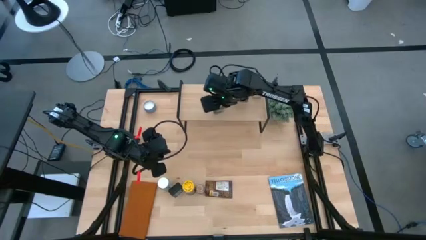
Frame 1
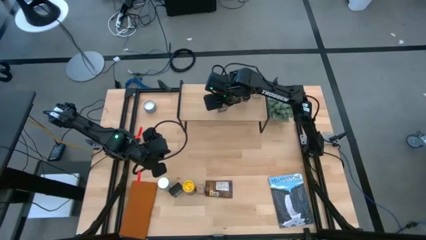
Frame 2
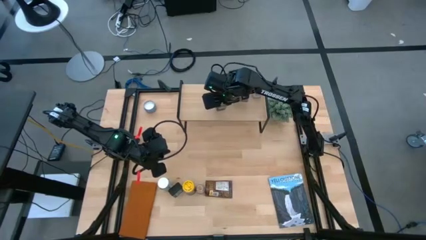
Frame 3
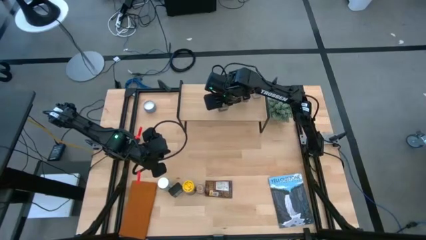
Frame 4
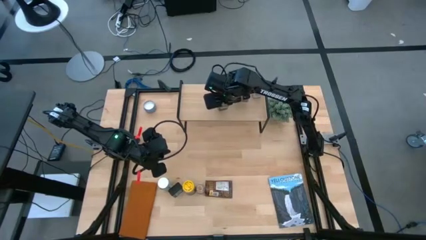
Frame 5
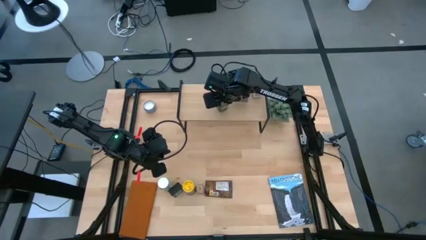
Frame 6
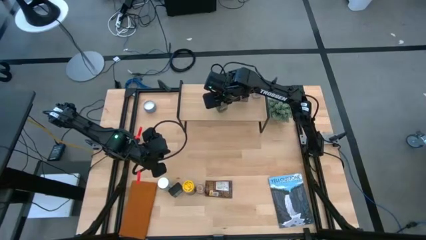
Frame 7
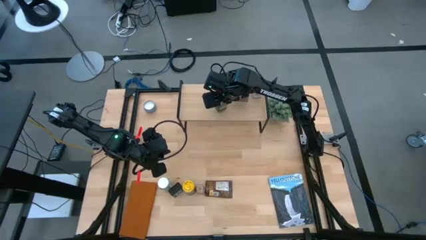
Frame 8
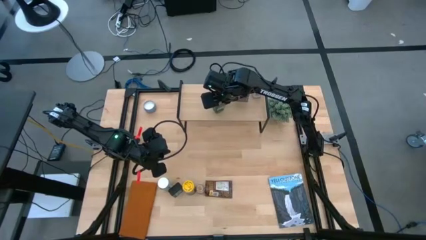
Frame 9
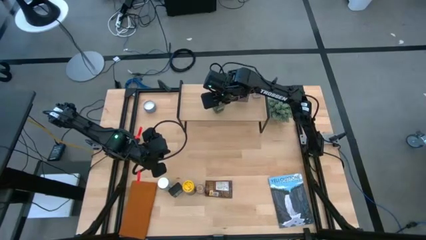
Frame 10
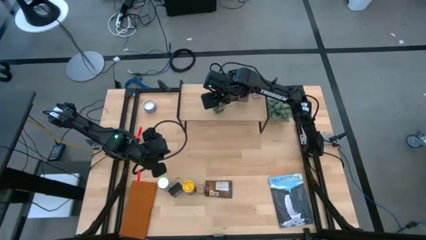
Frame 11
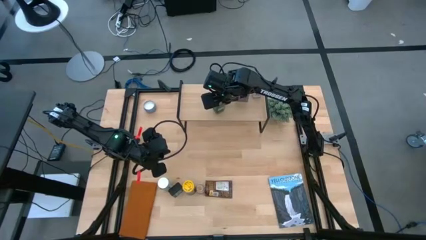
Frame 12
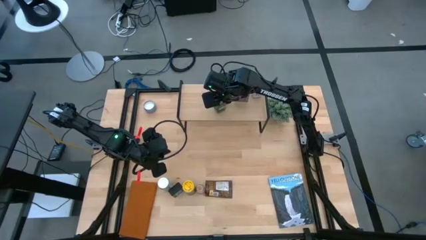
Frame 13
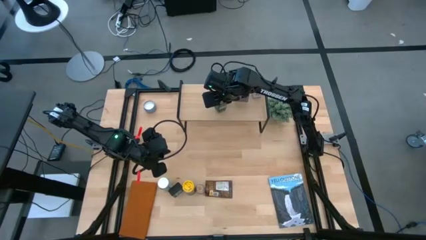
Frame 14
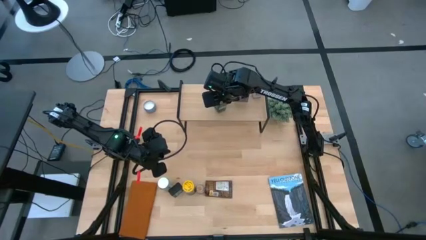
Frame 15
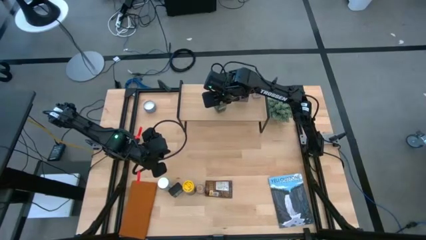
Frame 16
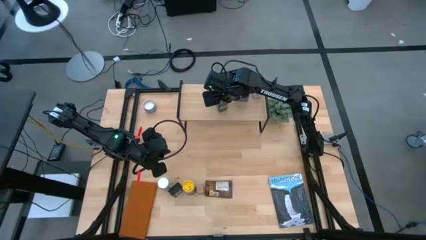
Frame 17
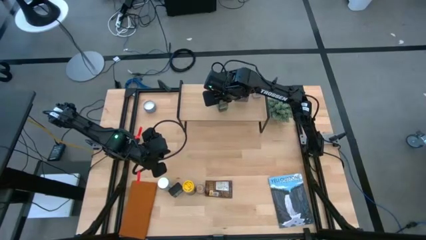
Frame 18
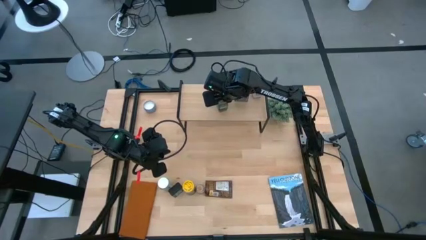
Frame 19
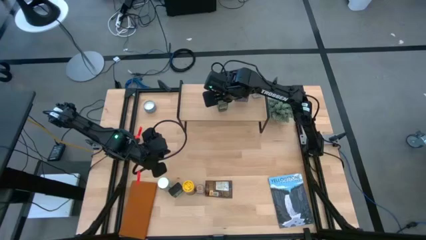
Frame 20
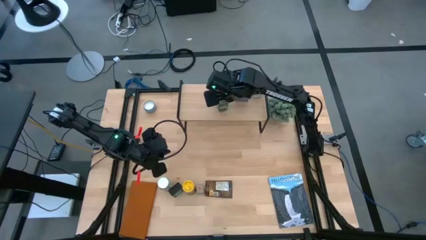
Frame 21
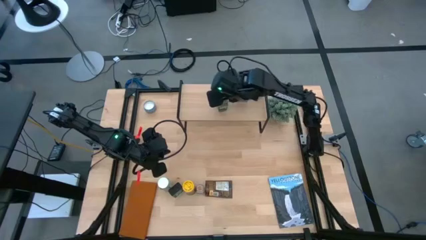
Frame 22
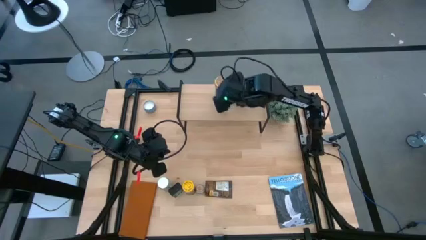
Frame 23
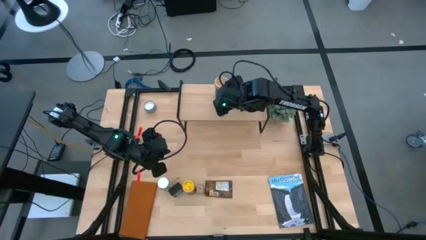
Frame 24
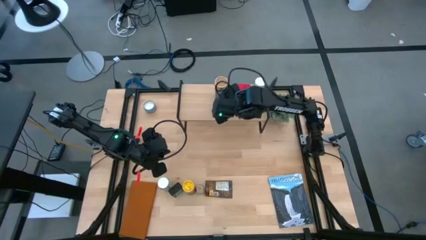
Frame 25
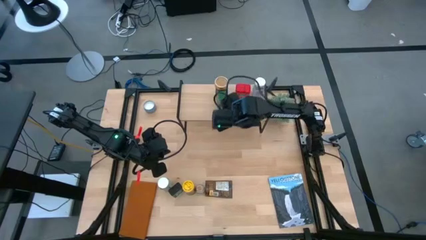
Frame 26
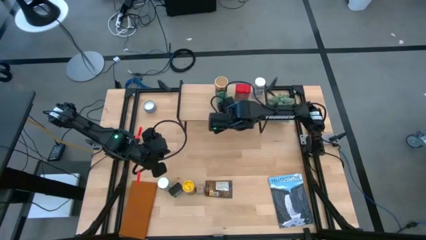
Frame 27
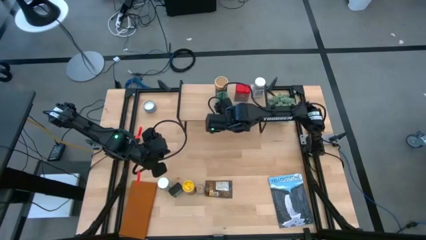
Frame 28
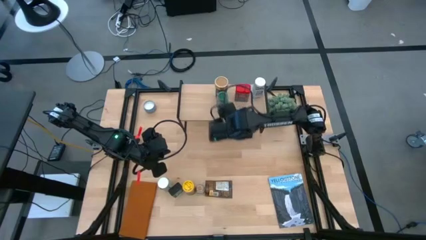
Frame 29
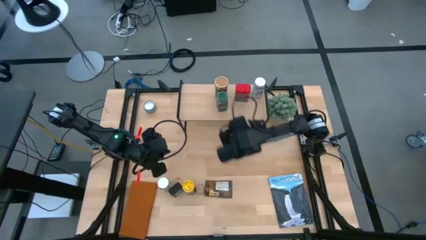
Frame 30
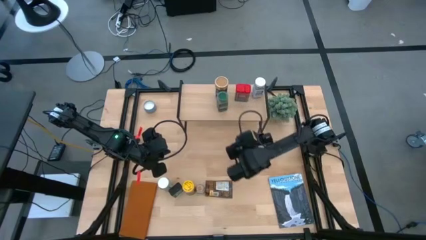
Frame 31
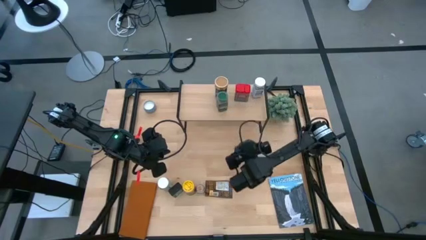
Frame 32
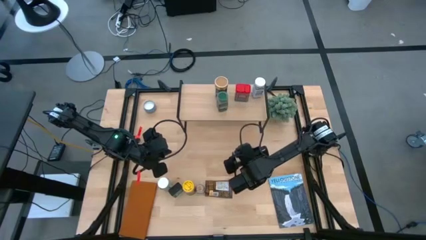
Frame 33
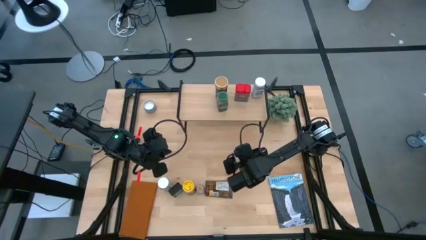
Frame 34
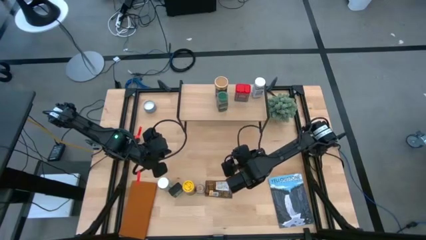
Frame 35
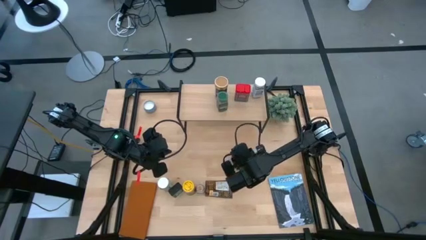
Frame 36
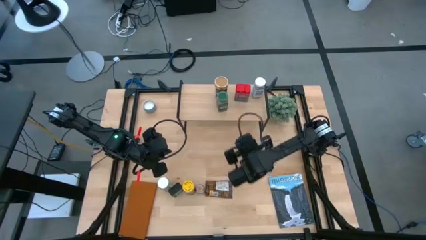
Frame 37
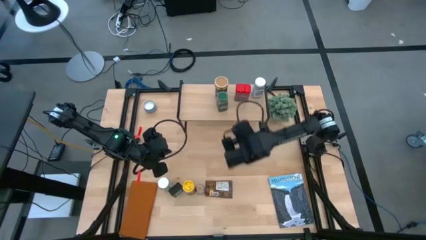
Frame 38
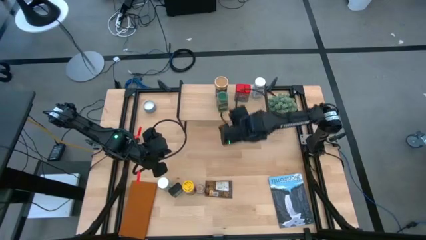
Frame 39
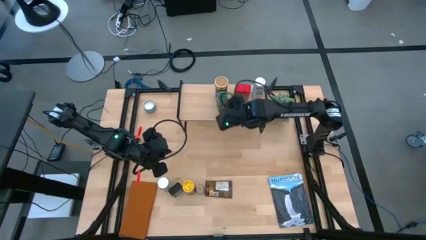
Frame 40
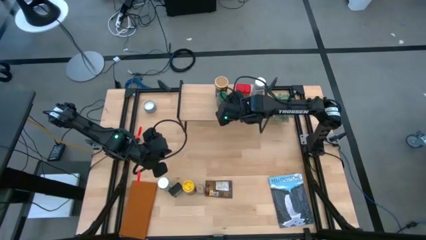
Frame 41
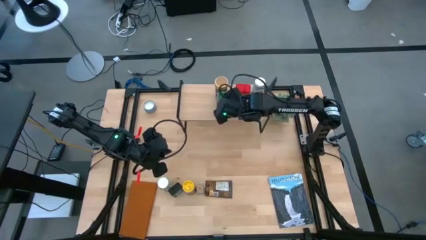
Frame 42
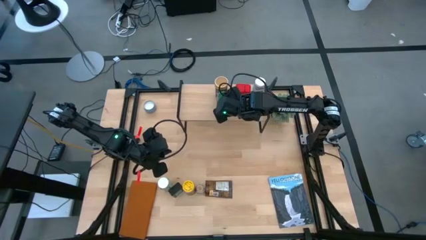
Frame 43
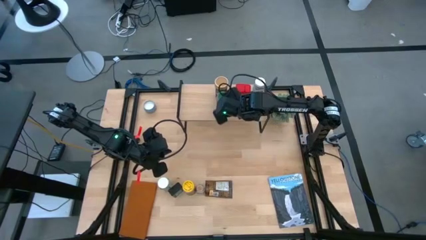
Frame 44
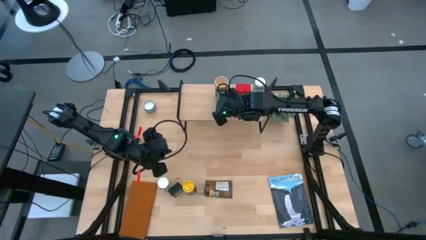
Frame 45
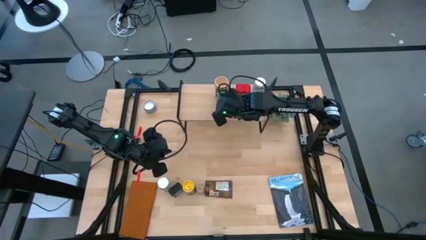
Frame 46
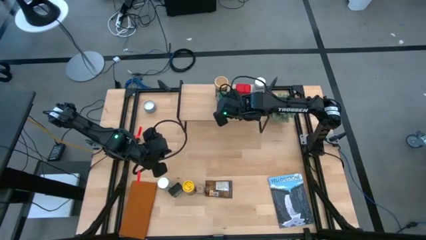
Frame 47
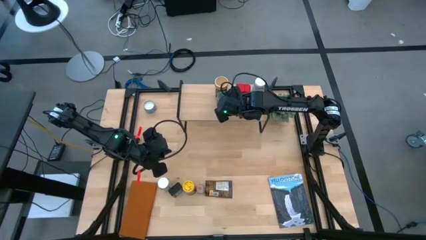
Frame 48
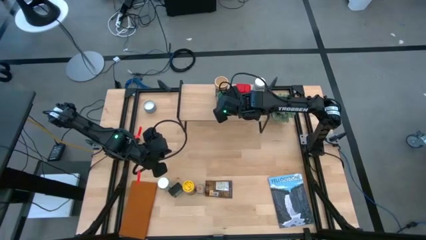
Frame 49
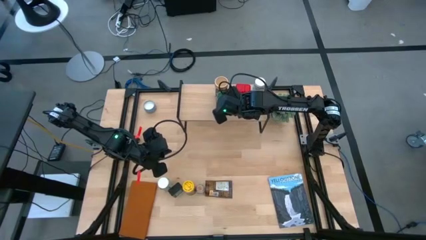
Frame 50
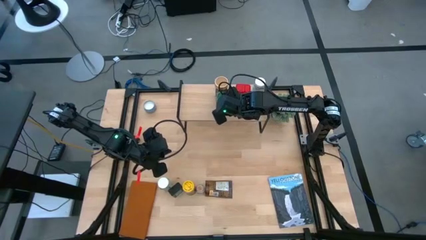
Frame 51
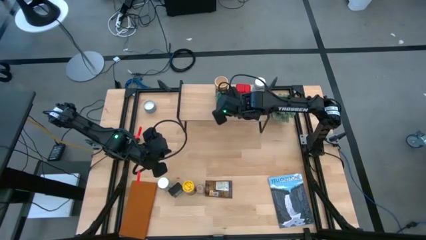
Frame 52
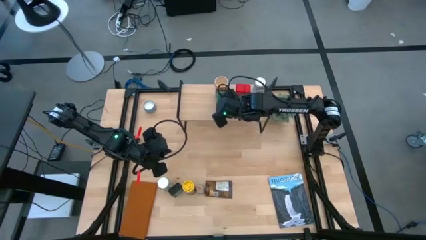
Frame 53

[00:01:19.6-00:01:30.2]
Task: Shelf spices
Put the green seasoning bottle on the shelf
